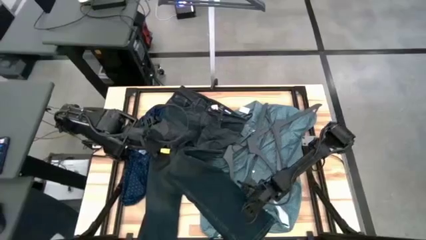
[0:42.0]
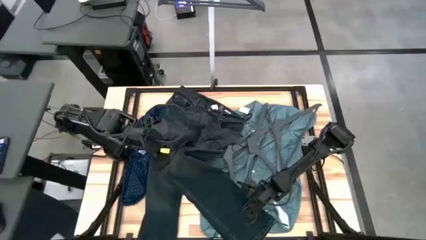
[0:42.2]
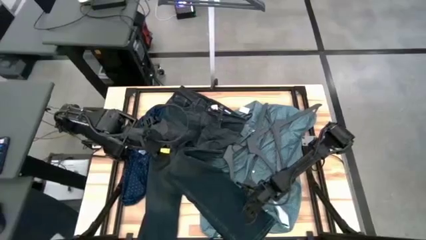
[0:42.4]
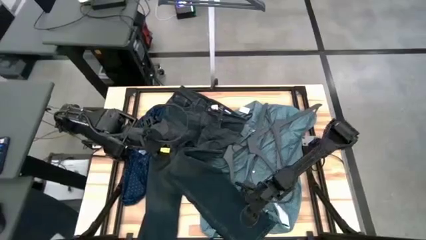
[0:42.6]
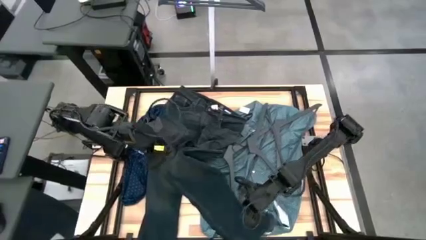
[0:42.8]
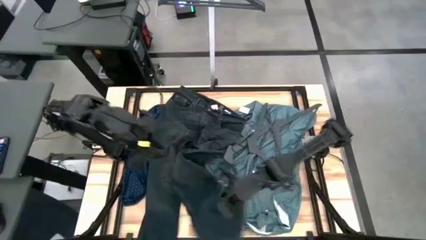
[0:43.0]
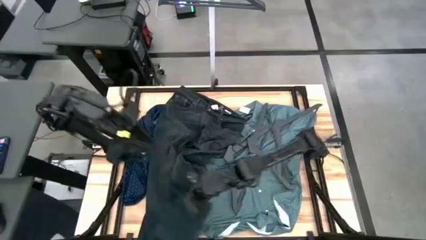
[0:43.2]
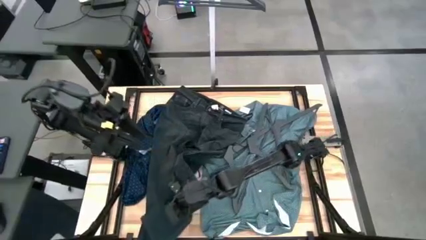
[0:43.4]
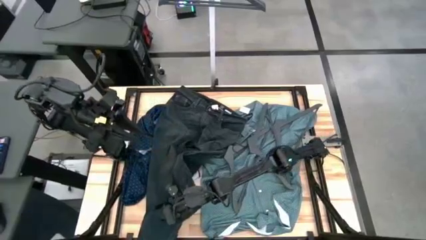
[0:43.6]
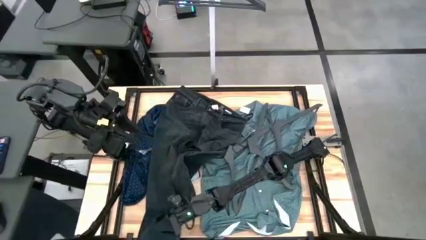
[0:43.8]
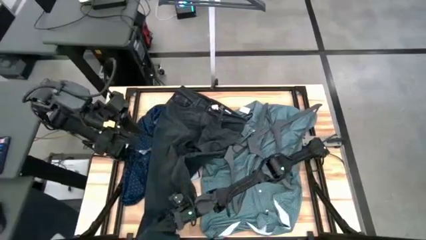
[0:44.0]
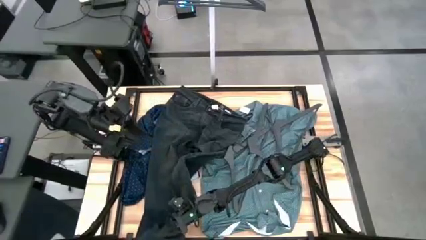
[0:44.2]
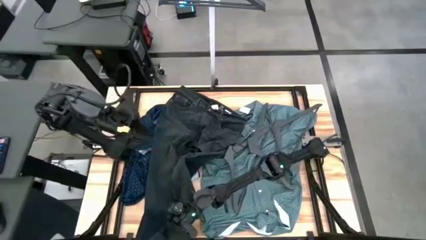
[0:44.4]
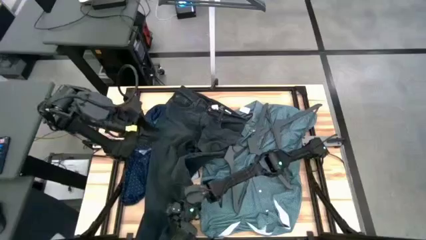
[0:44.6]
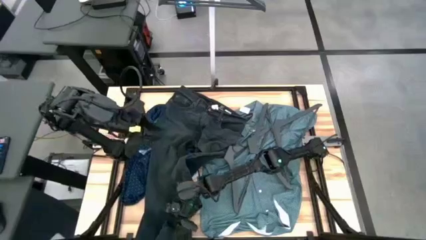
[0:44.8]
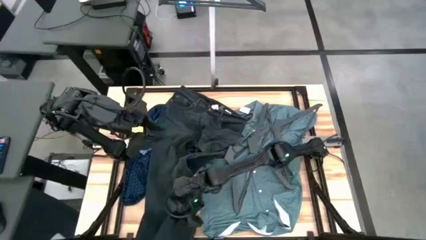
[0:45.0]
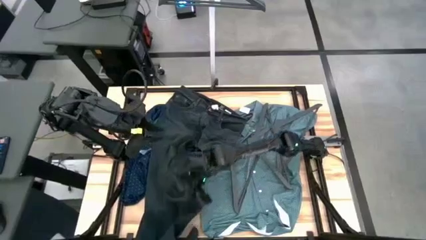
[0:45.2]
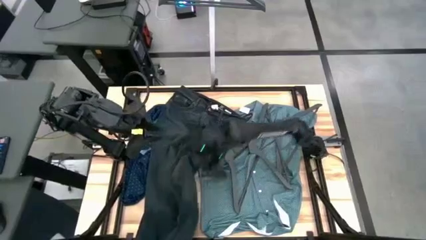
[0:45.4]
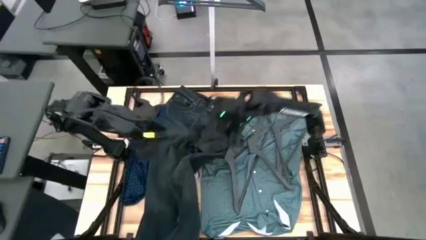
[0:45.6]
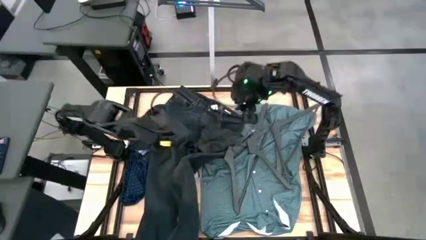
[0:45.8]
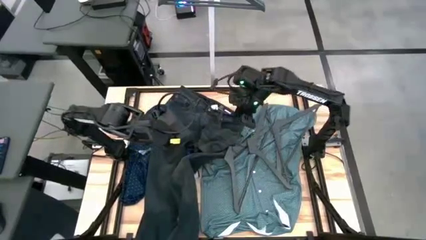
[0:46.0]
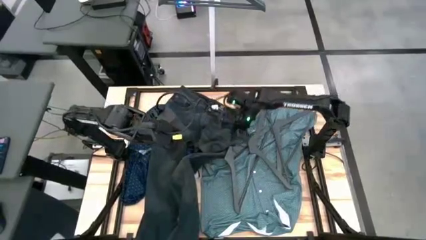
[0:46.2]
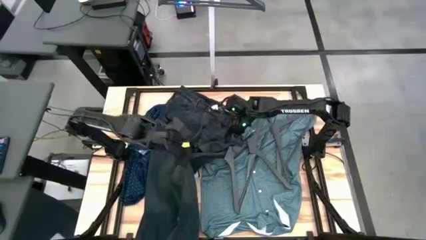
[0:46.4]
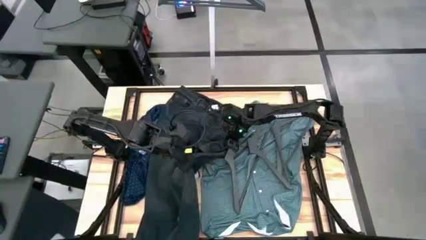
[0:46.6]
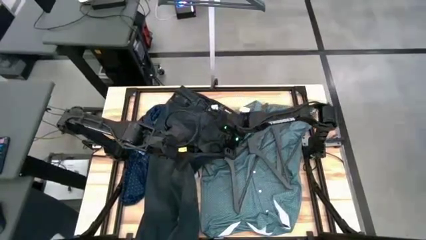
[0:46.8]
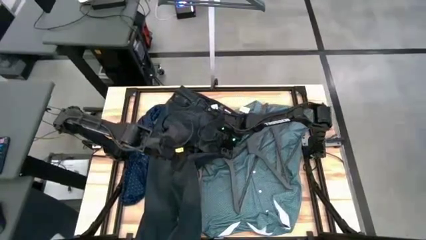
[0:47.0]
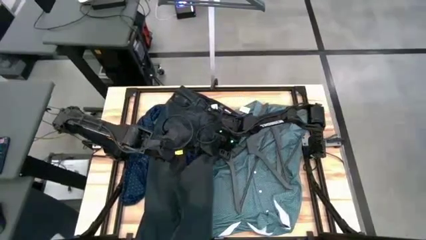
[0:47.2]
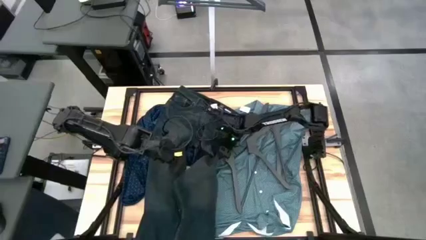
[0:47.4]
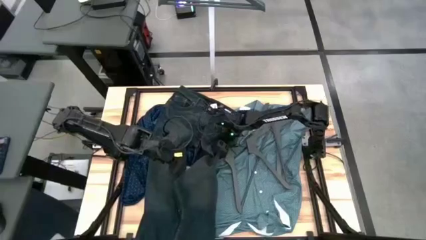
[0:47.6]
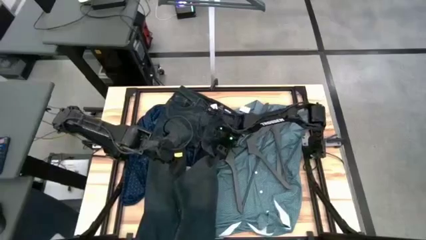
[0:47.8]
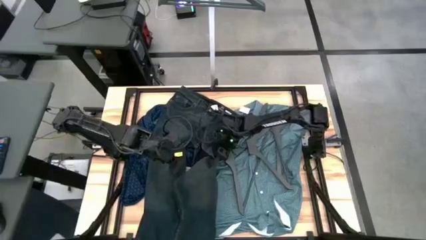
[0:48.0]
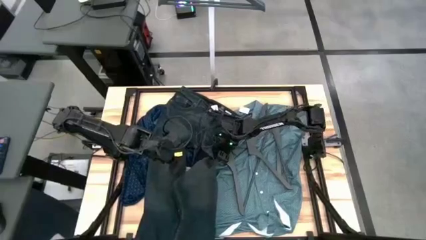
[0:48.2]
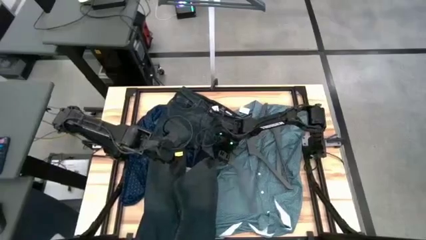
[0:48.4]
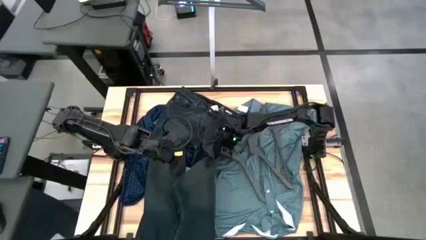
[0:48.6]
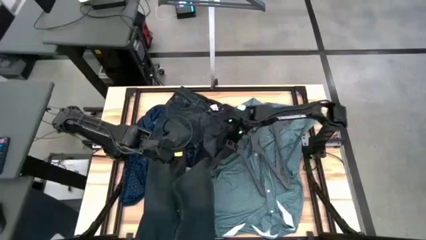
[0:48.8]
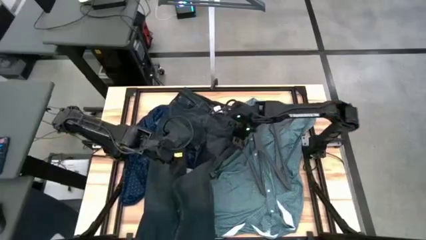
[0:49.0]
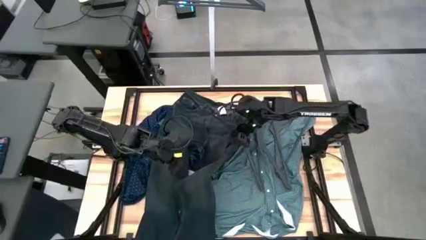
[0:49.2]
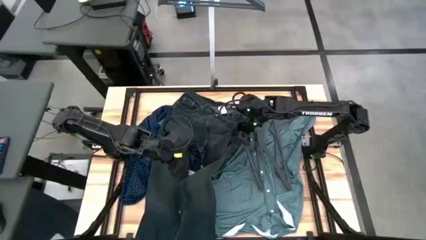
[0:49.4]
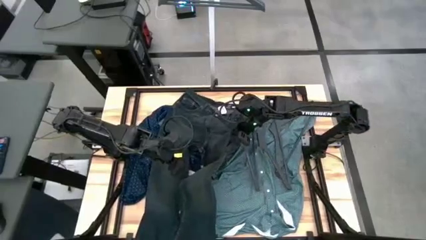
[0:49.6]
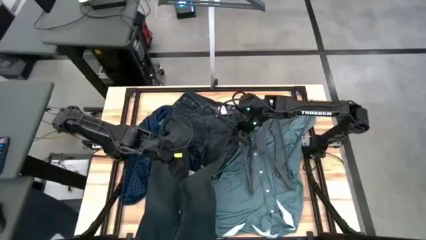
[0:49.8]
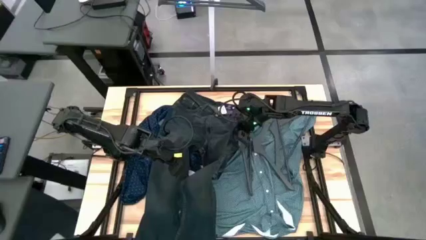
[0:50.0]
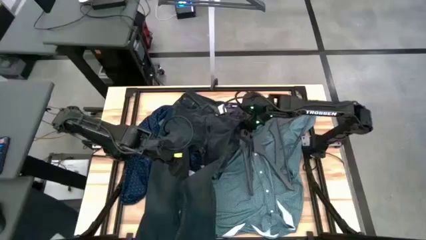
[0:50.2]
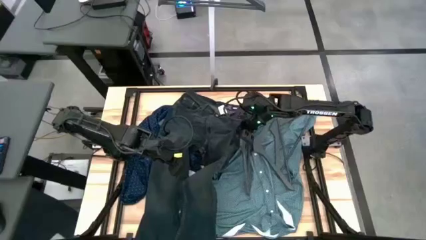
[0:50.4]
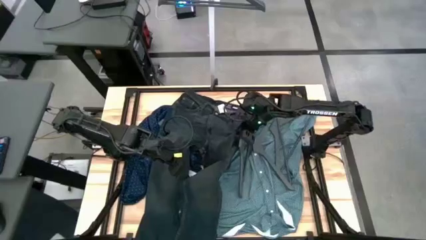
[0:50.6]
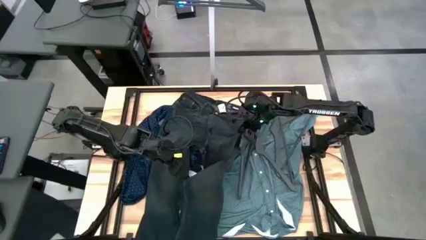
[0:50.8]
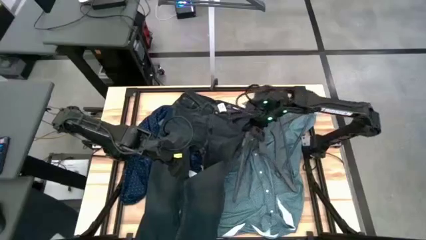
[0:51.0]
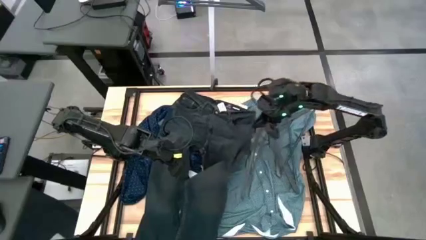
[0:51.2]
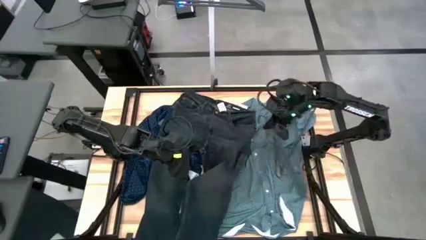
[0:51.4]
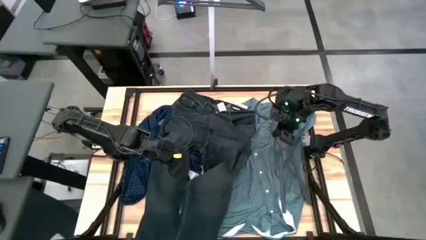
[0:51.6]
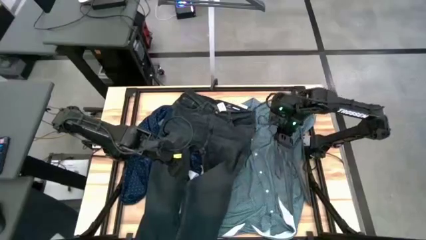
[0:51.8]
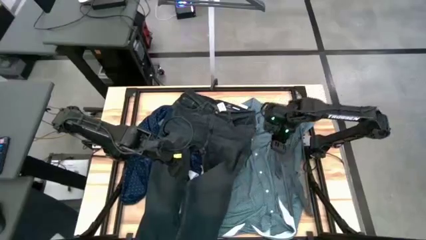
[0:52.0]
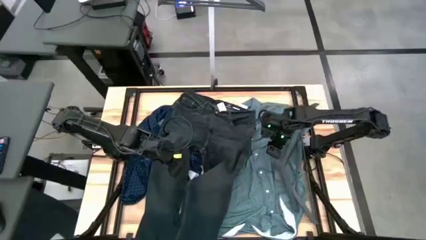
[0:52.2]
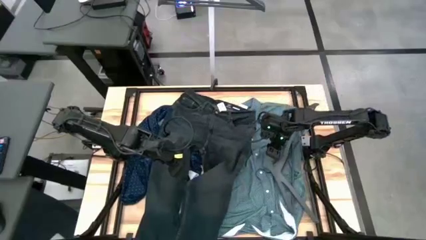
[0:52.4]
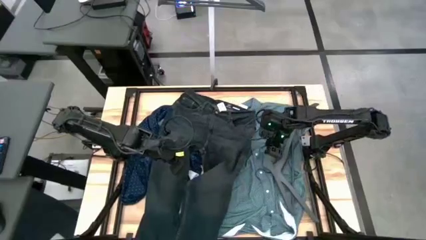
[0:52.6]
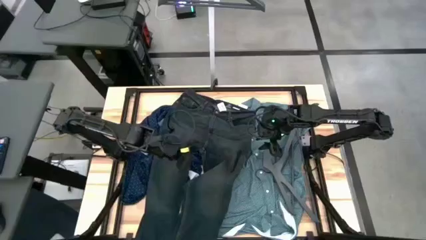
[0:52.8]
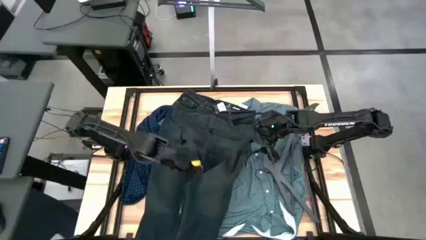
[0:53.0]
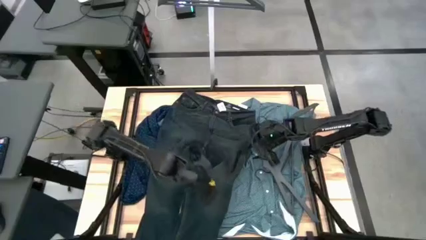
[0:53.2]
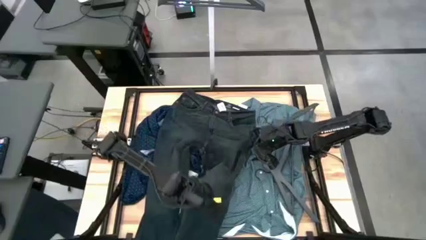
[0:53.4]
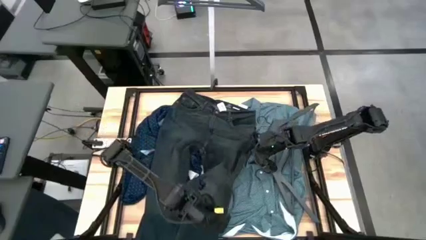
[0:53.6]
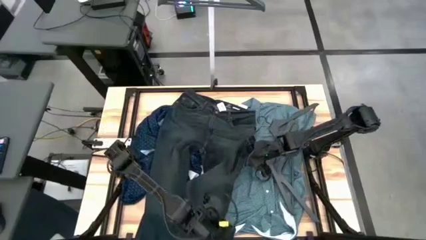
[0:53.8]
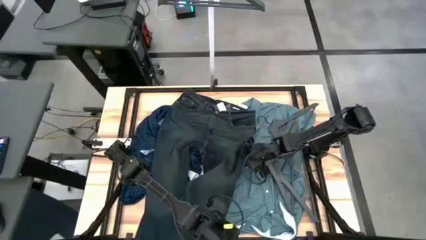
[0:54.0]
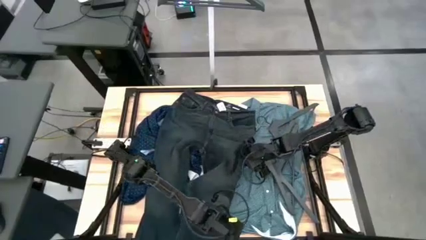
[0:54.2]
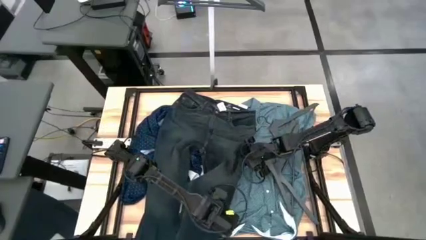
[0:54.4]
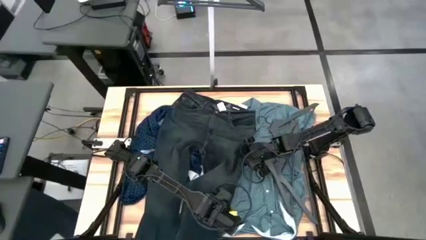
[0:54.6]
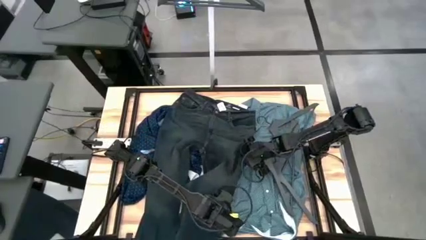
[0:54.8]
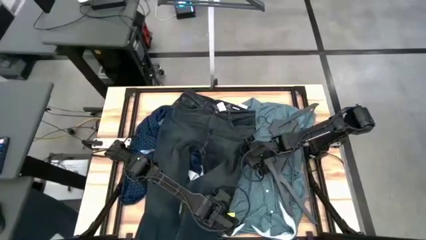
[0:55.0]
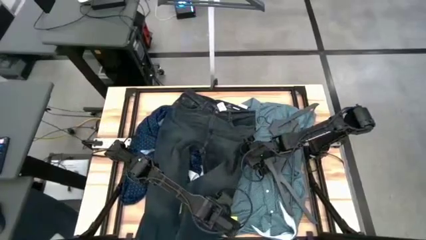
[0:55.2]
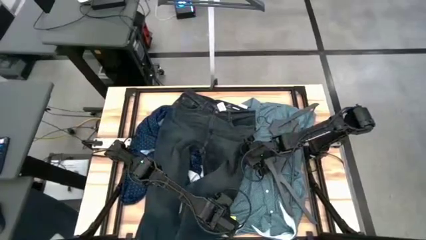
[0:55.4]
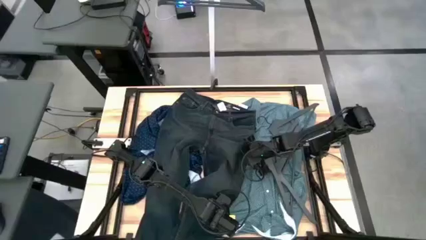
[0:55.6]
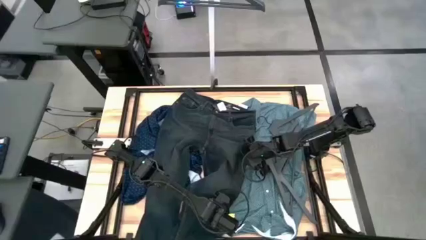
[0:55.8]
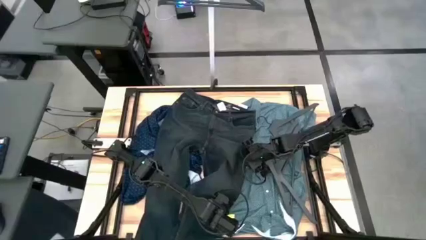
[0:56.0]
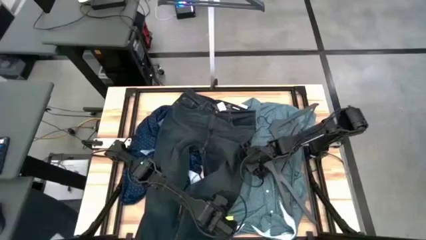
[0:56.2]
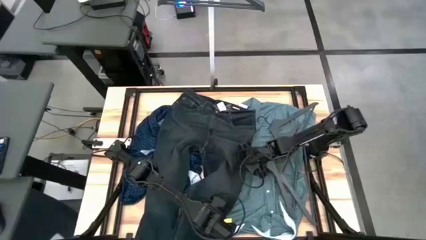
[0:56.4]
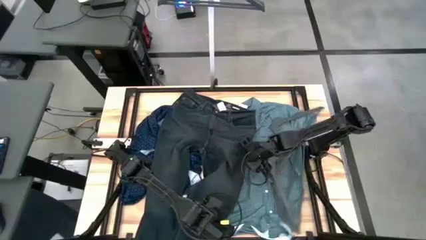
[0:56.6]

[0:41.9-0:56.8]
Task: Hang clothes
Hang the black pants on the rack
